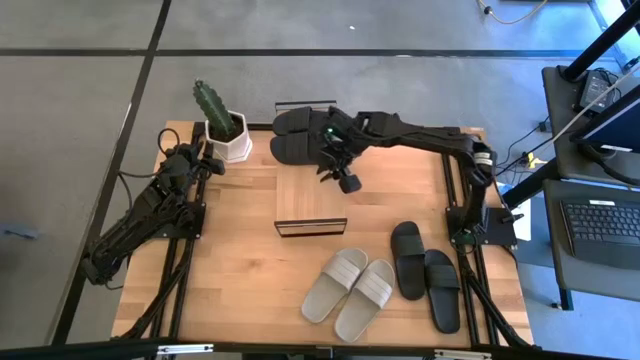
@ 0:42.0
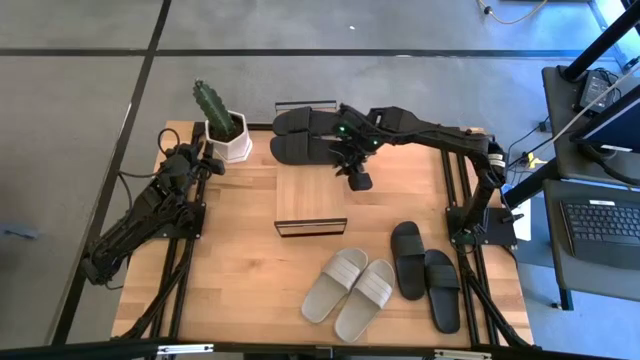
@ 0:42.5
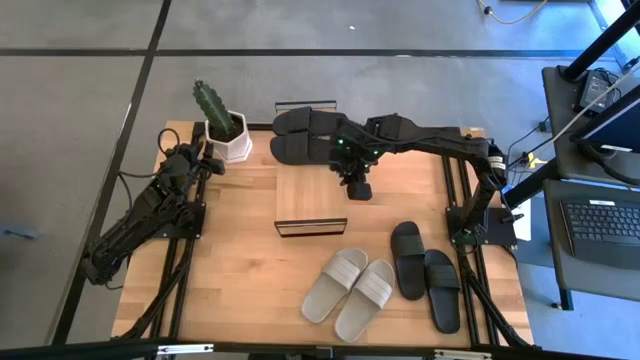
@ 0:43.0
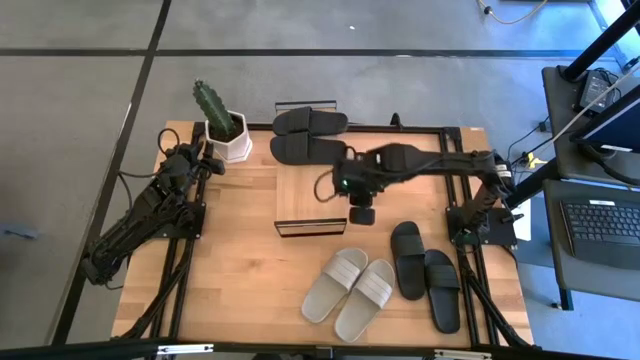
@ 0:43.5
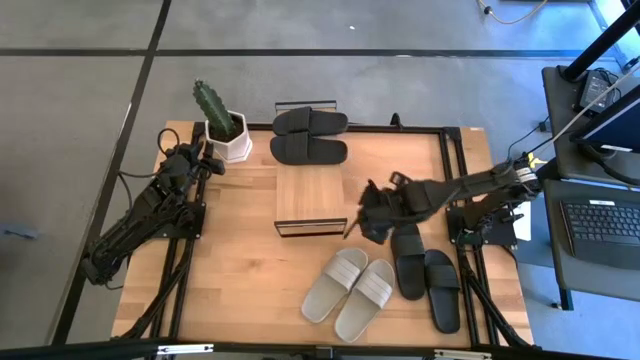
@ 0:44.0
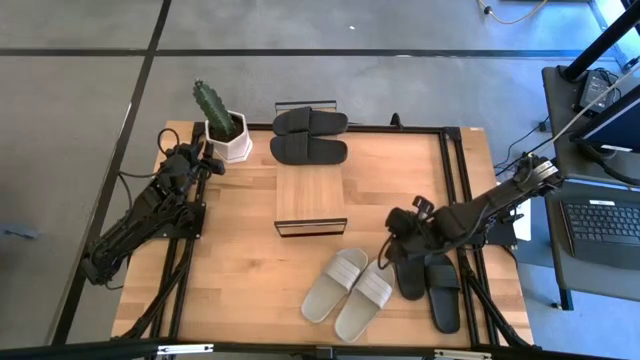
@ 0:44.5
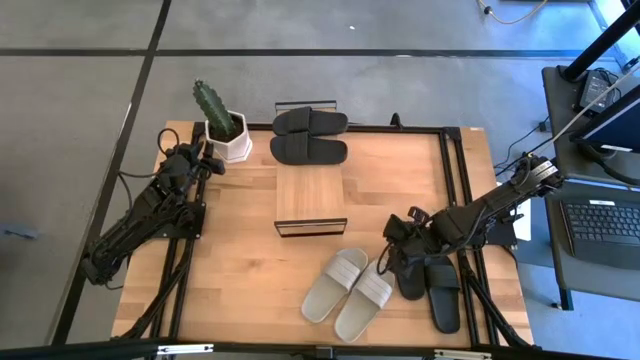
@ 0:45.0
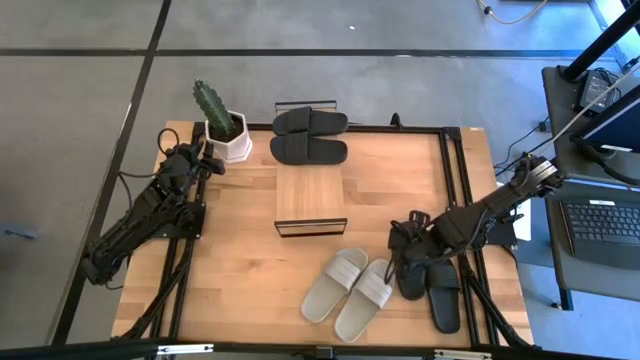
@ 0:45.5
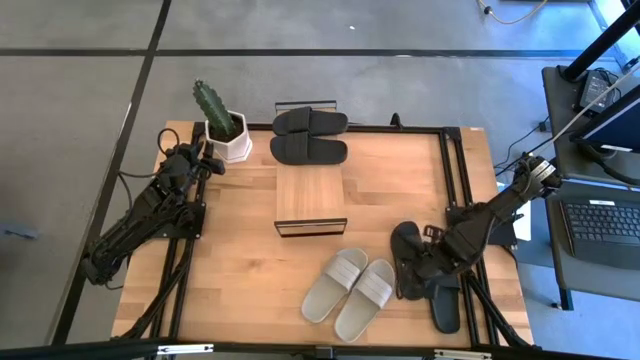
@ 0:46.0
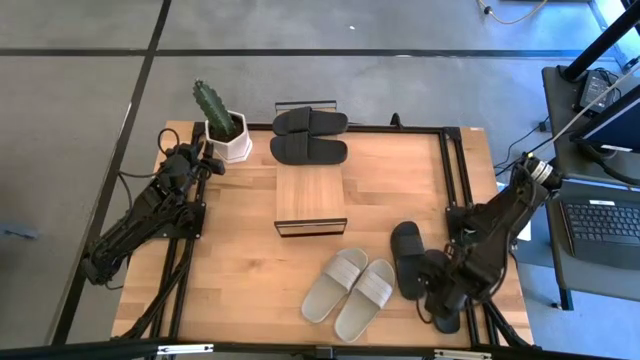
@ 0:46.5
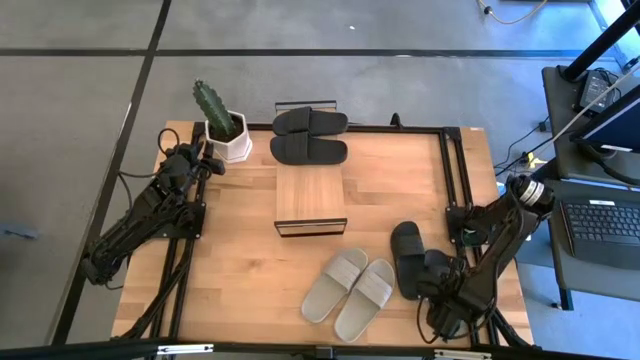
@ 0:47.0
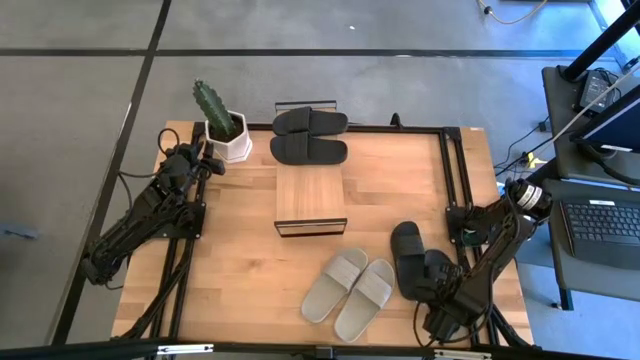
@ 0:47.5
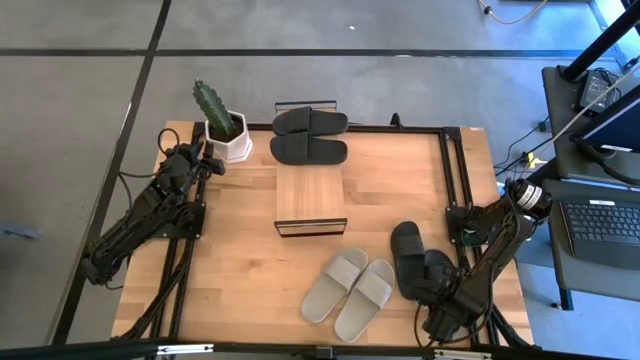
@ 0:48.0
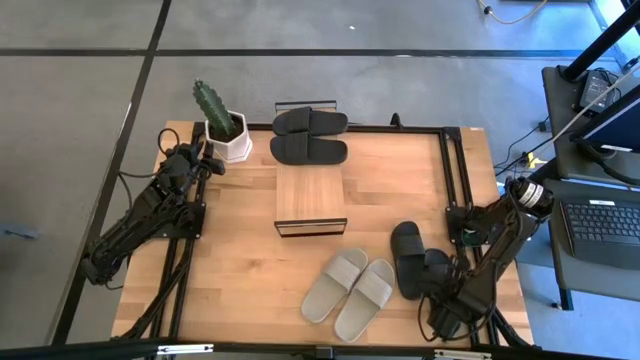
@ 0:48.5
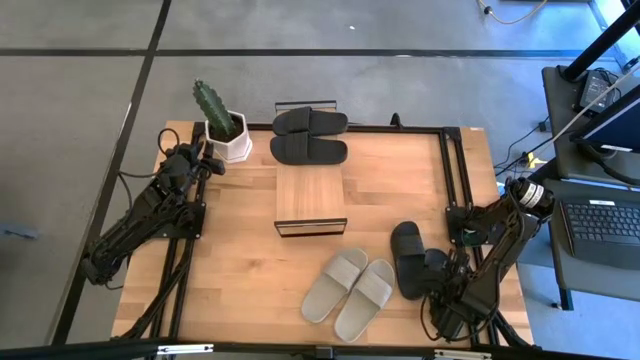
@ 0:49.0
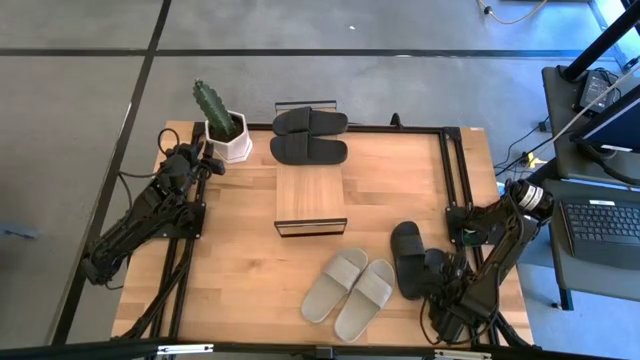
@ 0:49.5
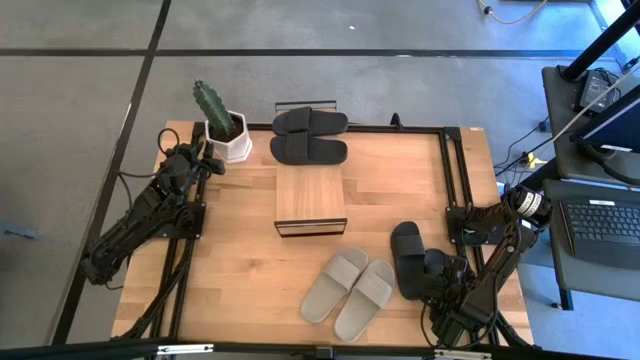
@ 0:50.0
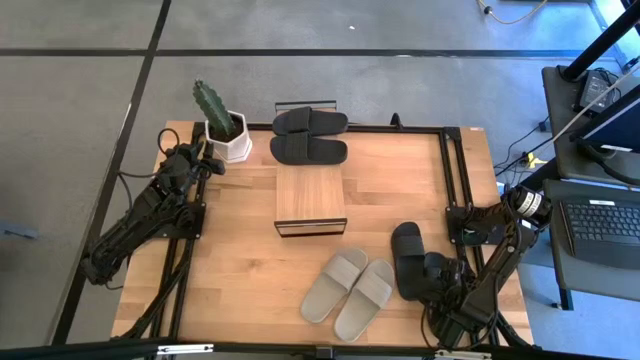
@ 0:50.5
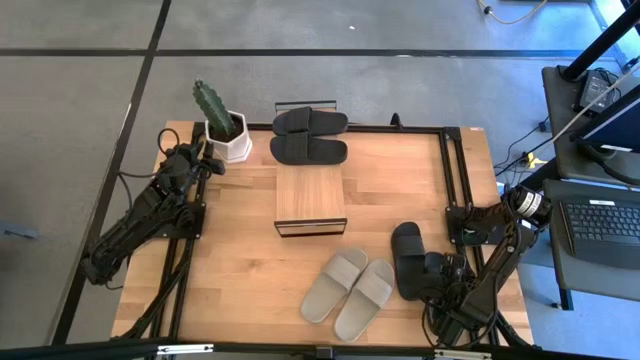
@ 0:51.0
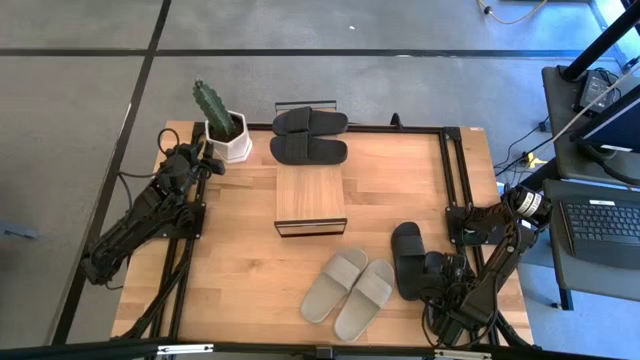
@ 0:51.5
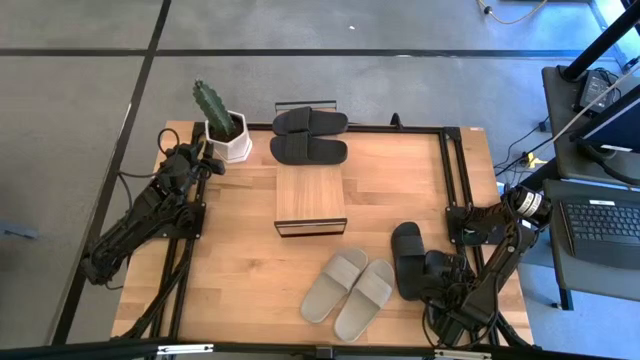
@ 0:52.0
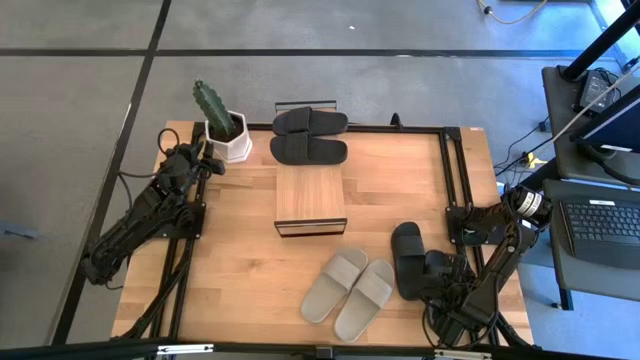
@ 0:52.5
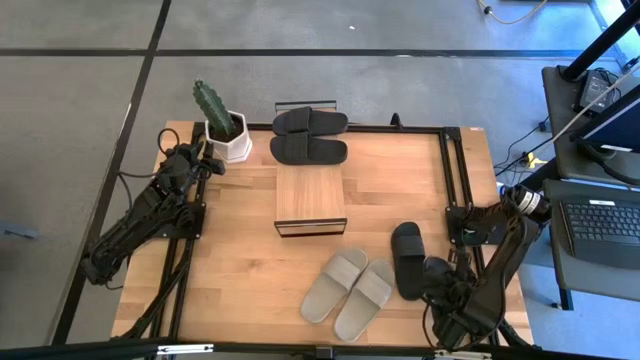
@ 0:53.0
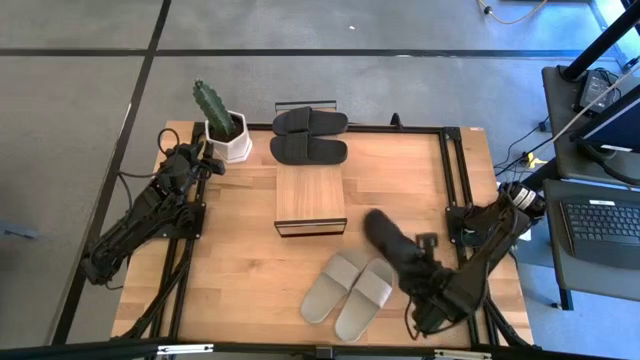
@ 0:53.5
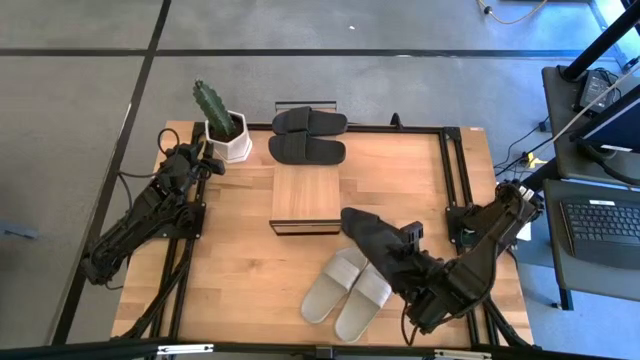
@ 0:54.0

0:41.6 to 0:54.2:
Task: Pick and place slides into the shelf
Put the right black slide on the shelf

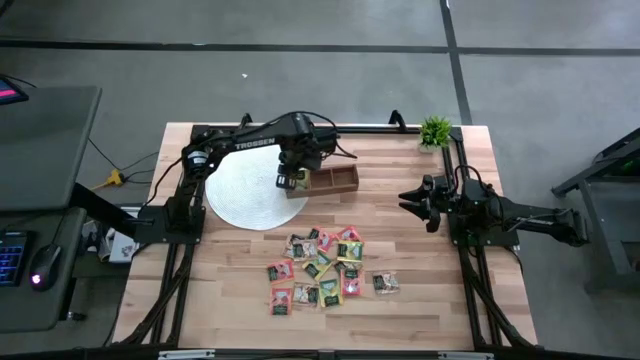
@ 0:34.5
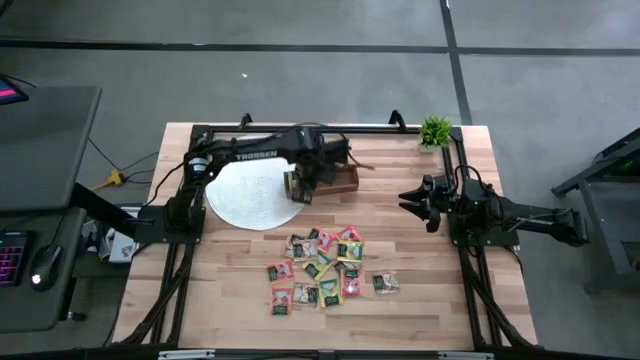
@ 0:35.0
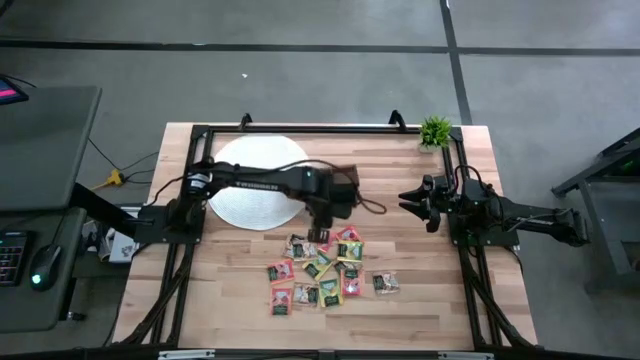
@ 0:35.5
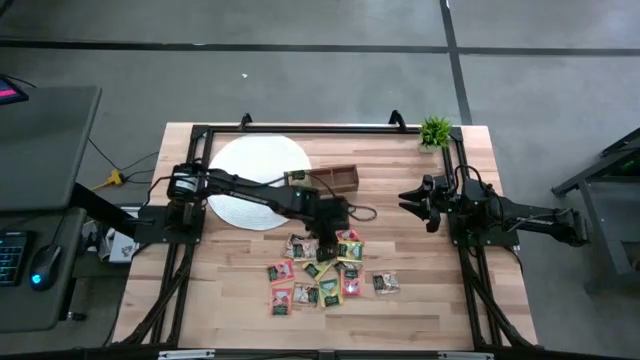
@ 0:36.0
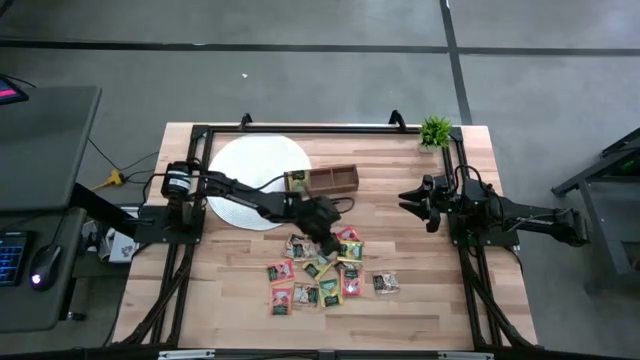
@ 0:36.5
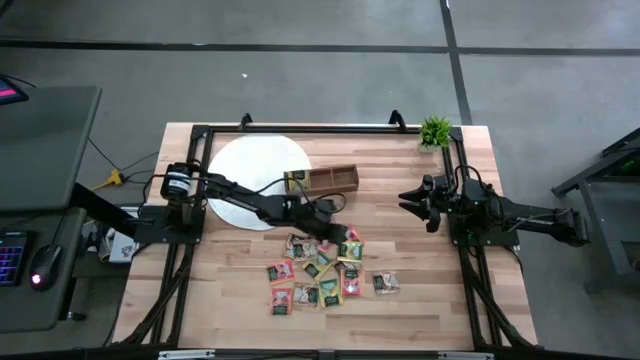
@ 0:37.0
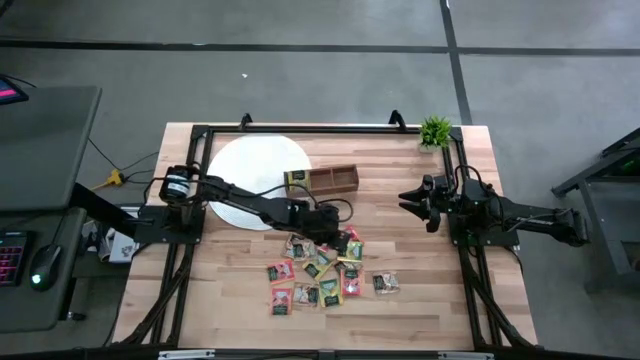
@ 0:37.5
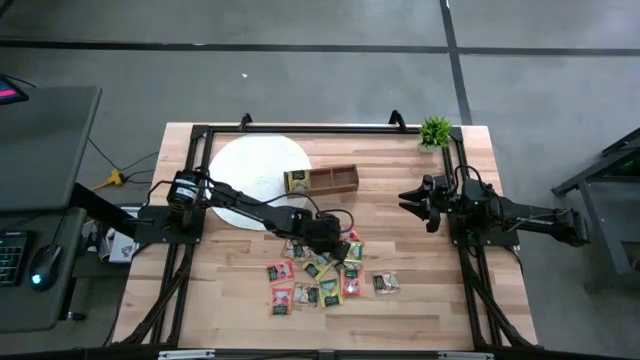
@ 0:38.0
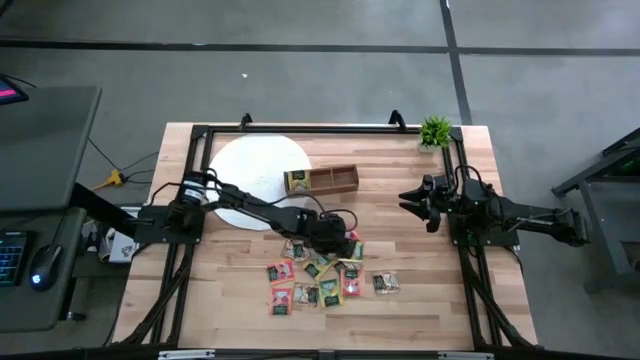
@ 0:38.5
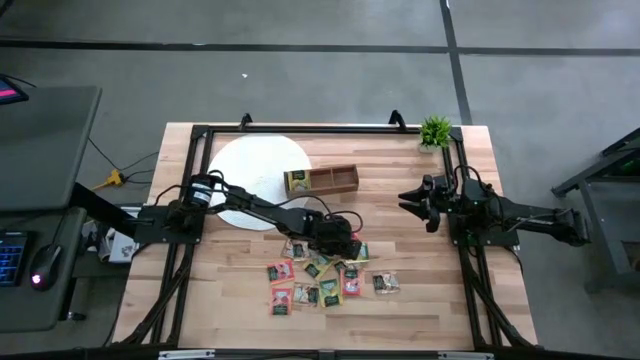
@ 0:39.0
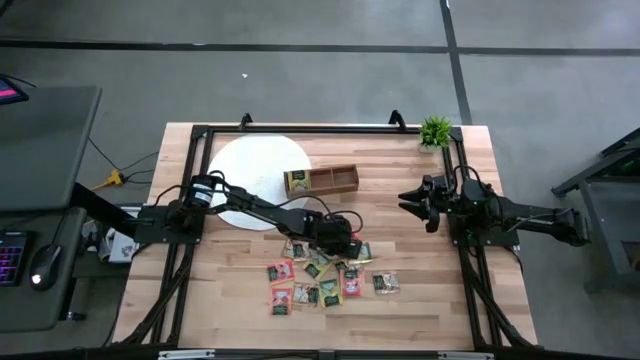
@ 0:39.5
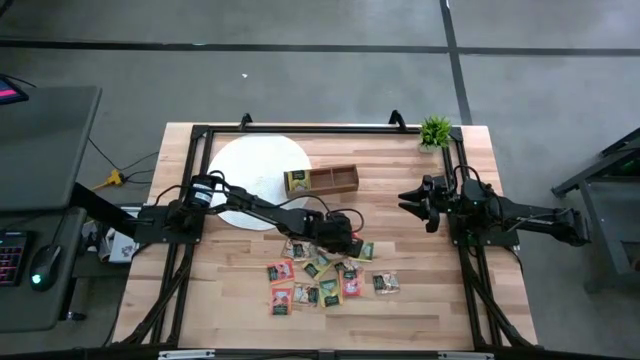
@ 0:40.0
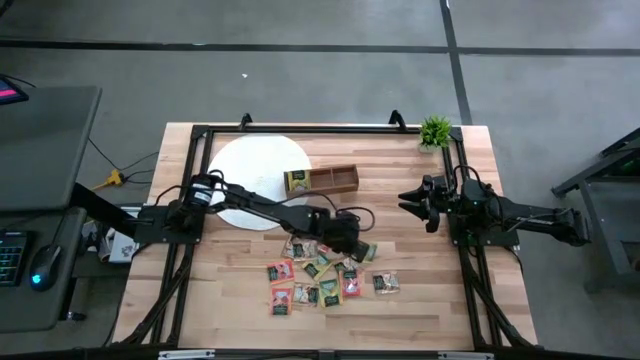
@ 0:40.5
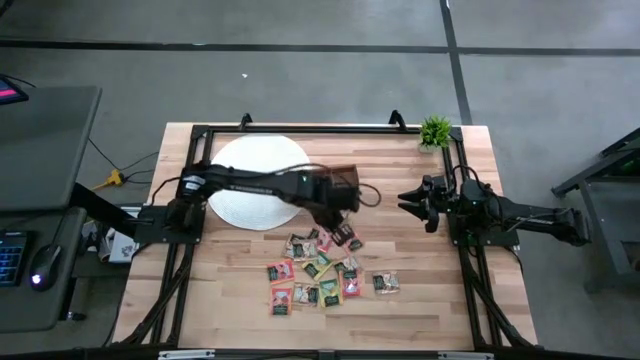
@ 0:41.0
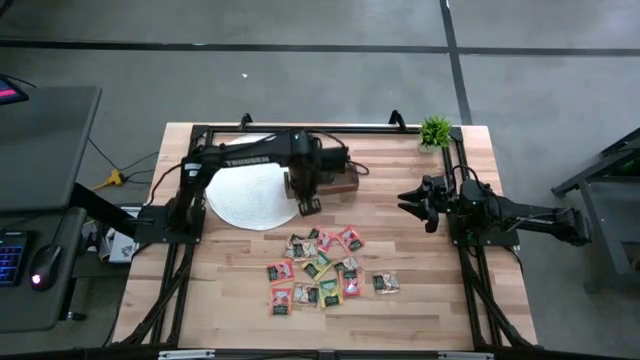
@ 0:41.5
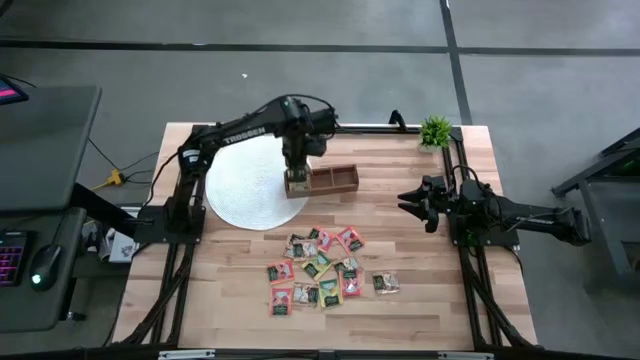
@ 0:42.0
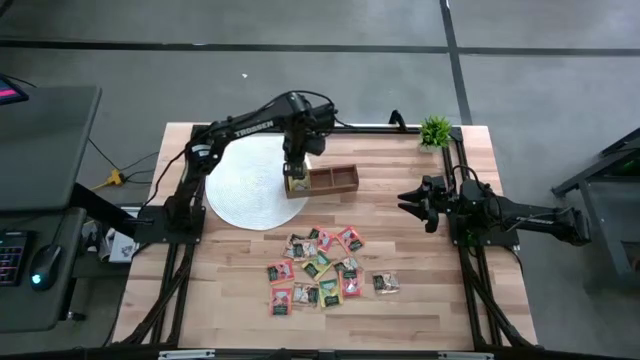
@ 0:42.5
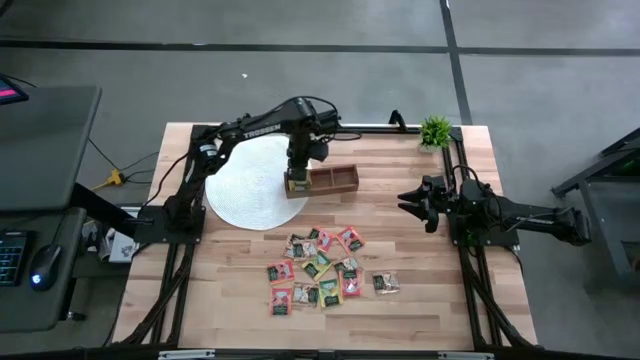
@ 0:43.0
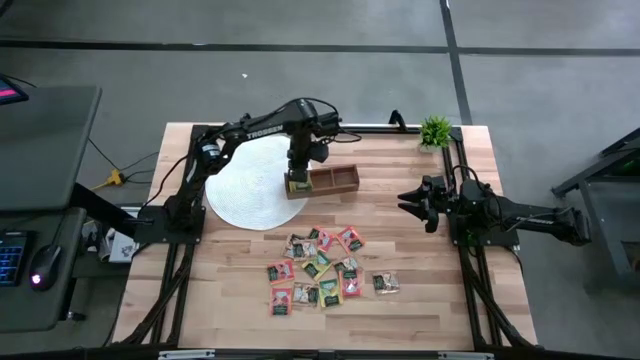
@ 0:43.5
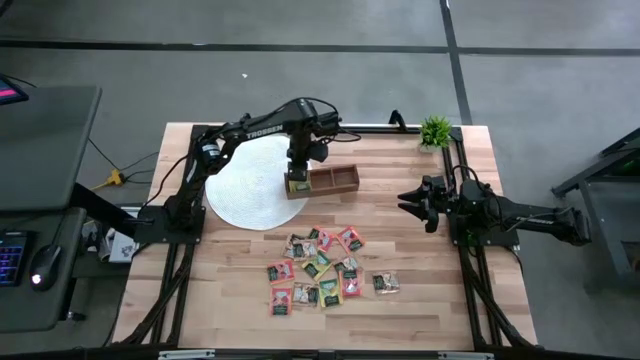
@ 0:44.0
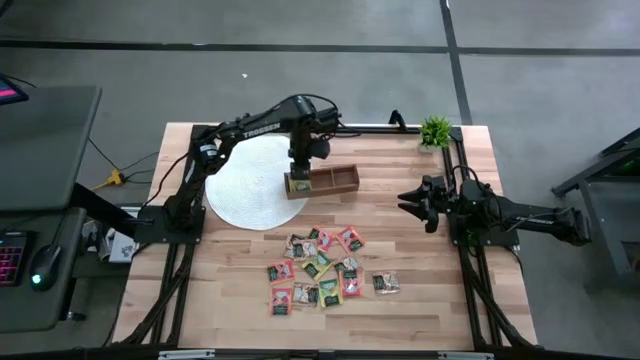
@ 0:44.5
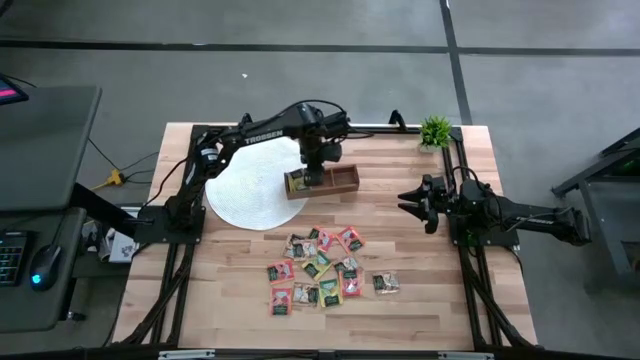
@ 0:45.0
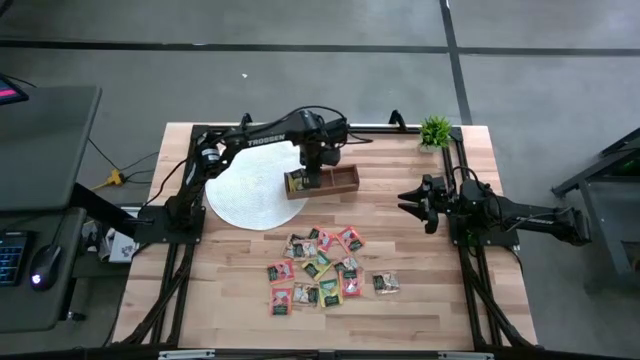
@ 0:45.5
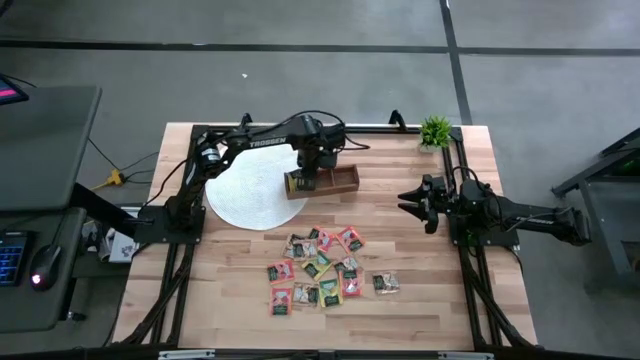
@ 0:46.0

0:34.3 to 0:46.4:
Task: Pick & Place Tea
Put the yellow tea bag into the left compartment of the wooden organizer
